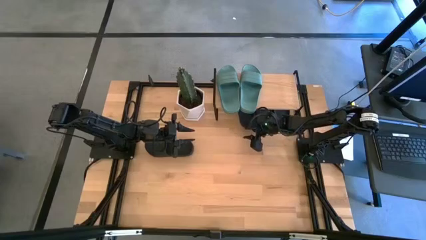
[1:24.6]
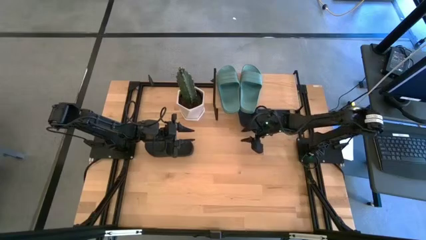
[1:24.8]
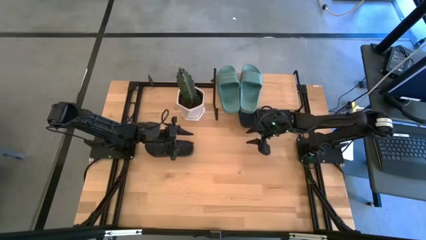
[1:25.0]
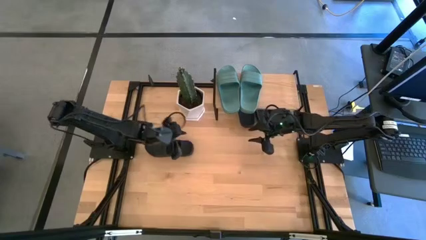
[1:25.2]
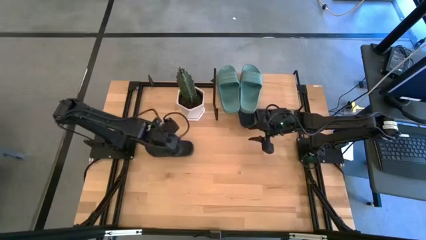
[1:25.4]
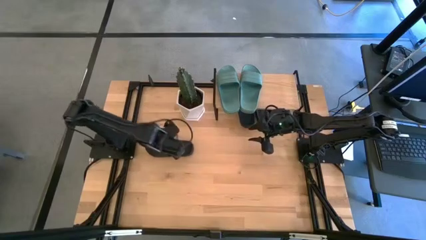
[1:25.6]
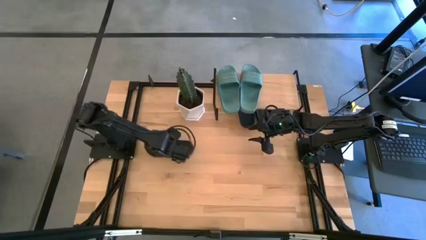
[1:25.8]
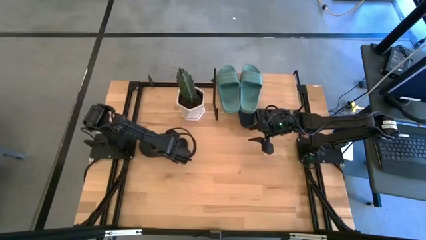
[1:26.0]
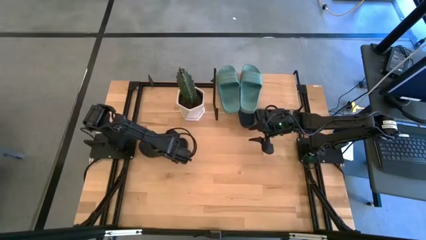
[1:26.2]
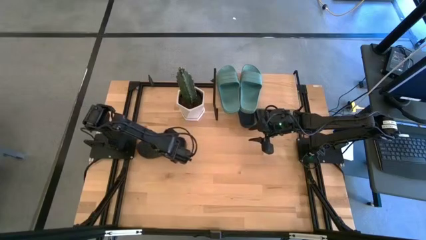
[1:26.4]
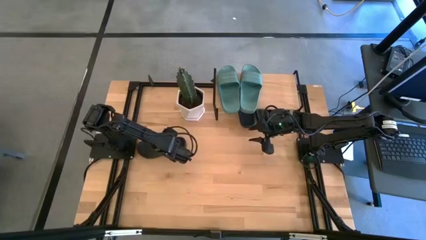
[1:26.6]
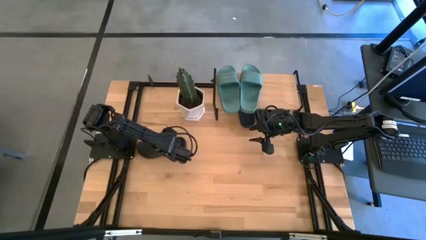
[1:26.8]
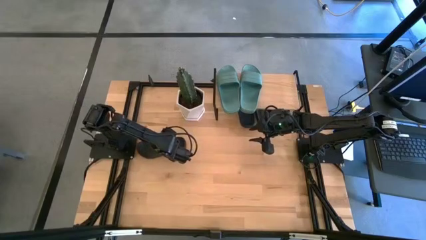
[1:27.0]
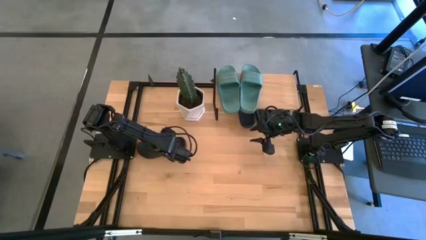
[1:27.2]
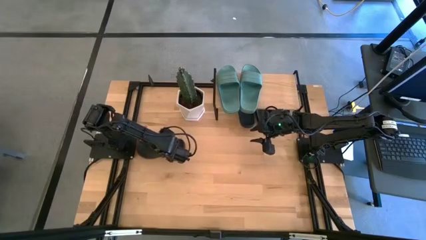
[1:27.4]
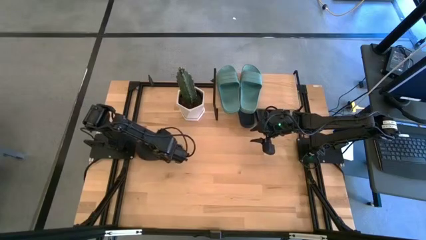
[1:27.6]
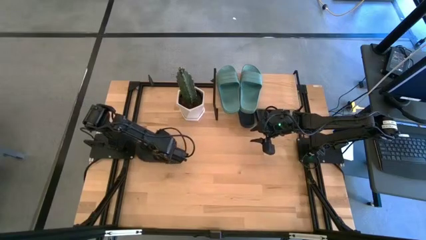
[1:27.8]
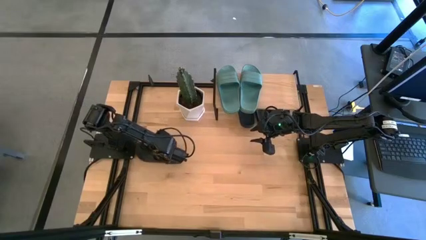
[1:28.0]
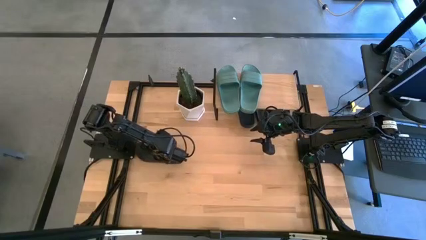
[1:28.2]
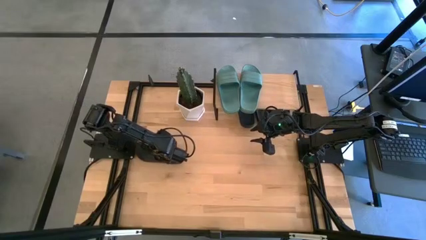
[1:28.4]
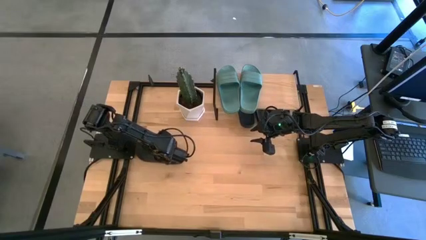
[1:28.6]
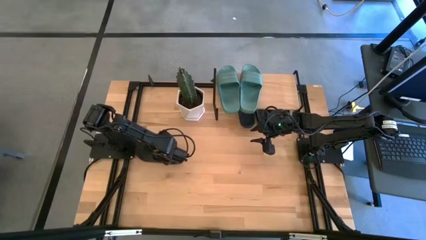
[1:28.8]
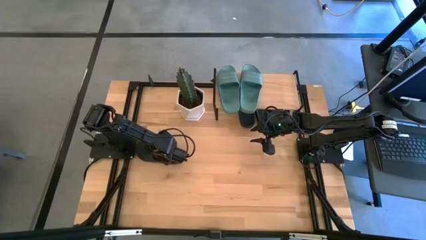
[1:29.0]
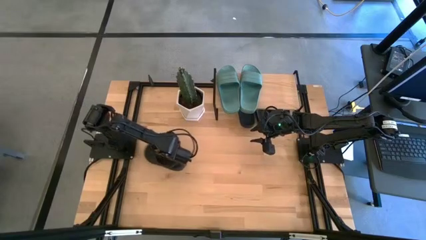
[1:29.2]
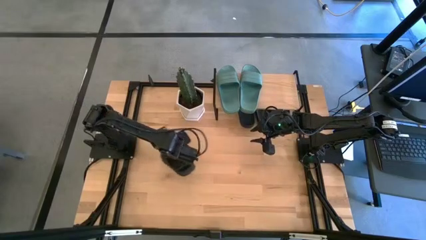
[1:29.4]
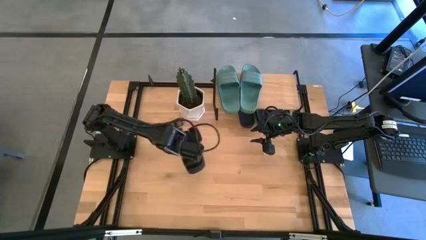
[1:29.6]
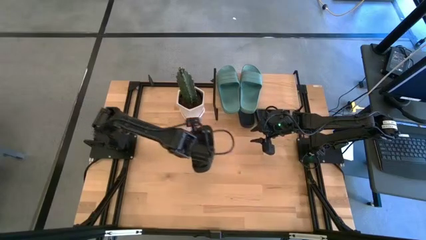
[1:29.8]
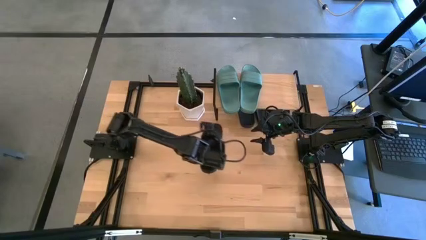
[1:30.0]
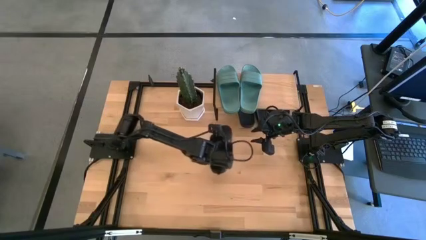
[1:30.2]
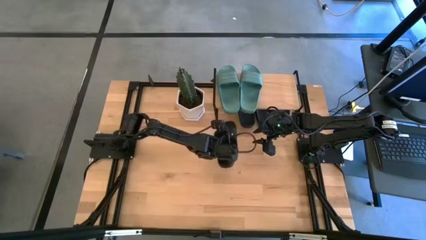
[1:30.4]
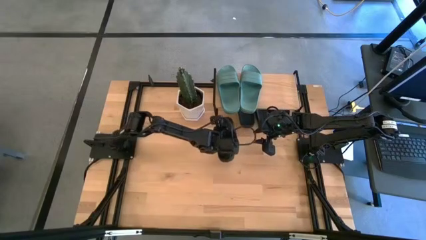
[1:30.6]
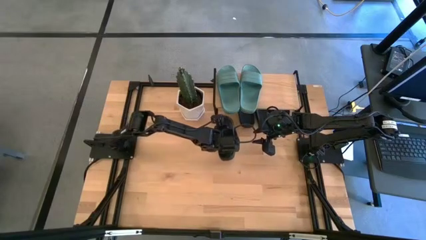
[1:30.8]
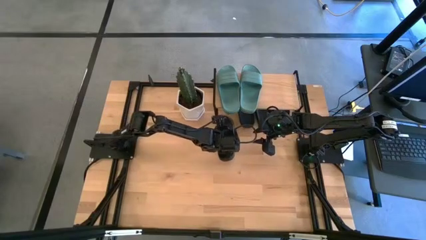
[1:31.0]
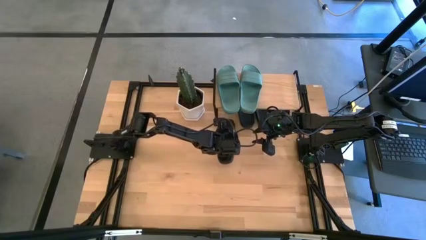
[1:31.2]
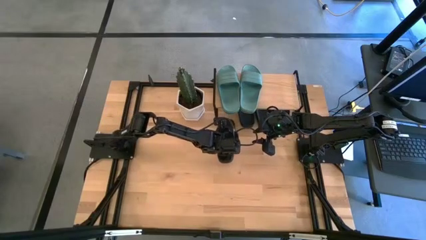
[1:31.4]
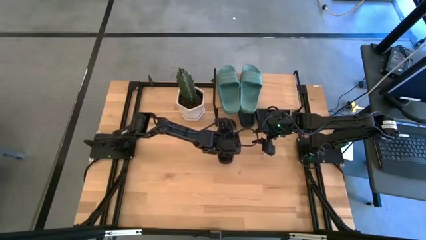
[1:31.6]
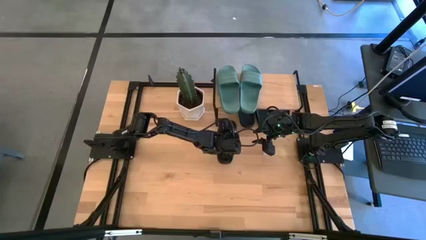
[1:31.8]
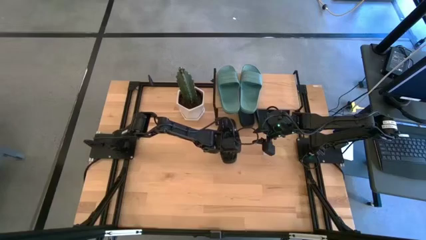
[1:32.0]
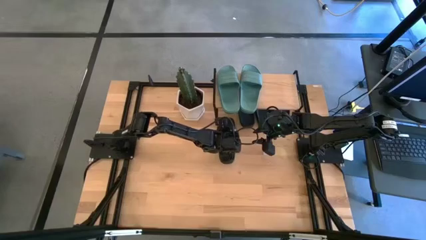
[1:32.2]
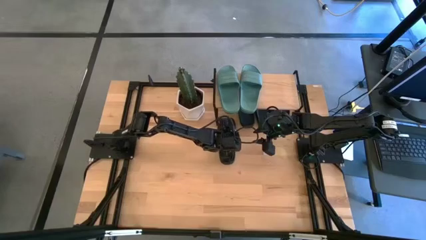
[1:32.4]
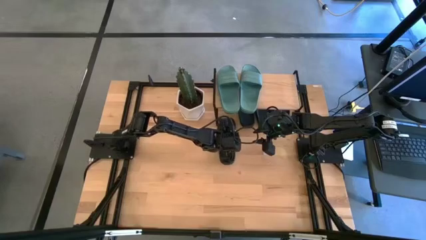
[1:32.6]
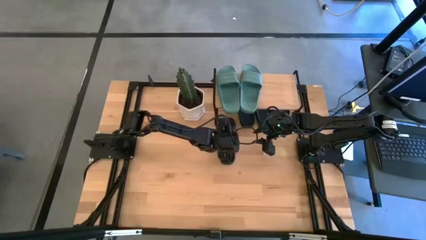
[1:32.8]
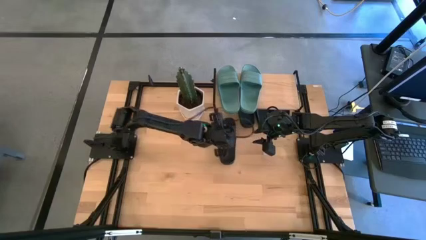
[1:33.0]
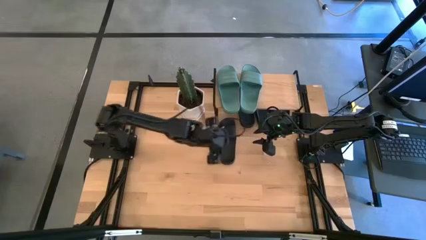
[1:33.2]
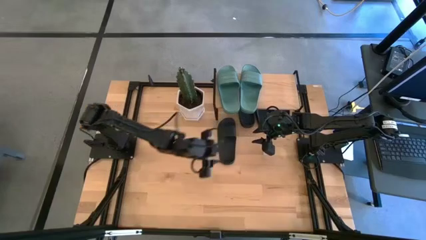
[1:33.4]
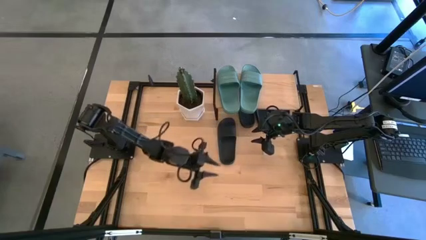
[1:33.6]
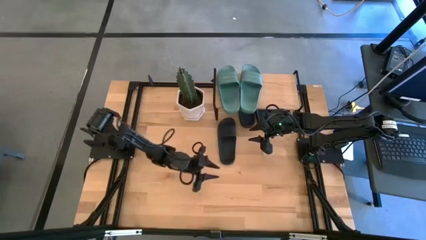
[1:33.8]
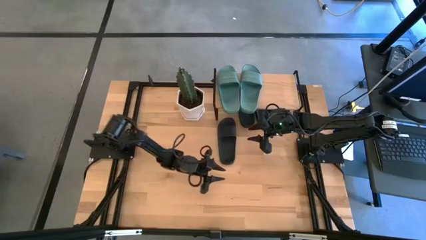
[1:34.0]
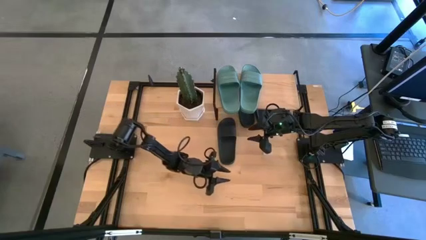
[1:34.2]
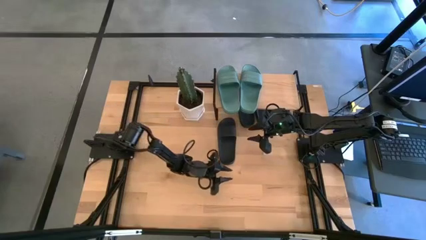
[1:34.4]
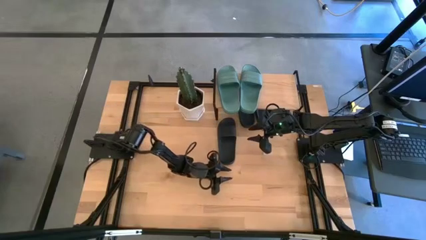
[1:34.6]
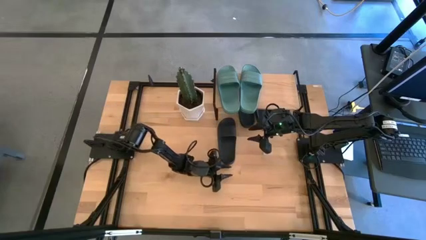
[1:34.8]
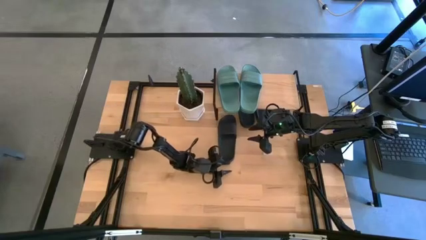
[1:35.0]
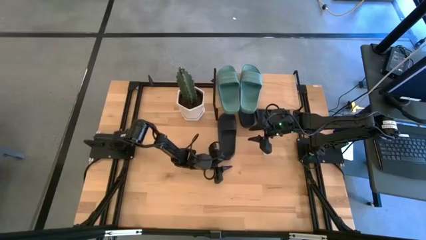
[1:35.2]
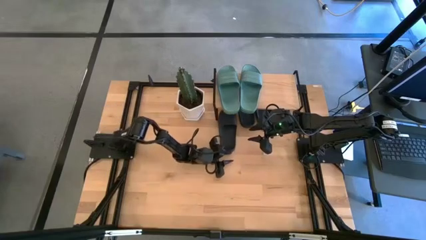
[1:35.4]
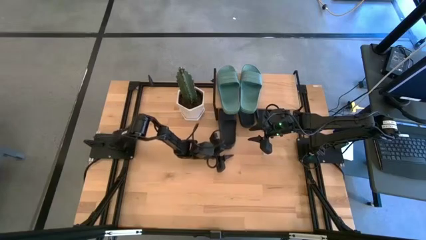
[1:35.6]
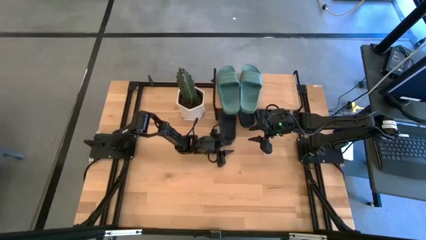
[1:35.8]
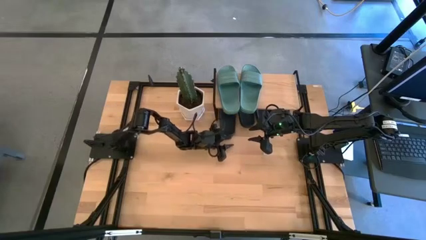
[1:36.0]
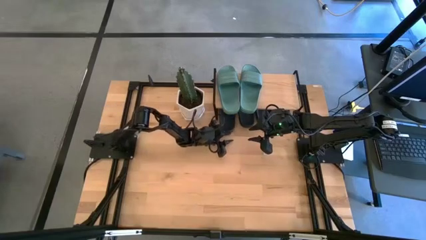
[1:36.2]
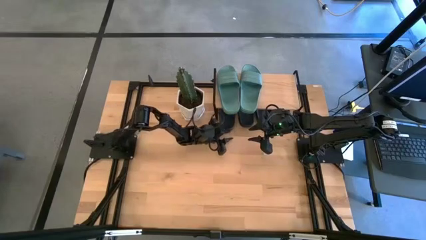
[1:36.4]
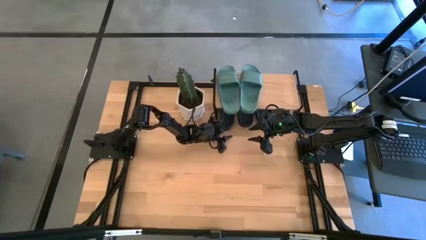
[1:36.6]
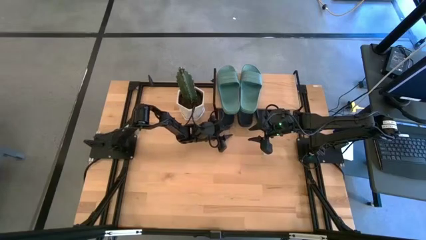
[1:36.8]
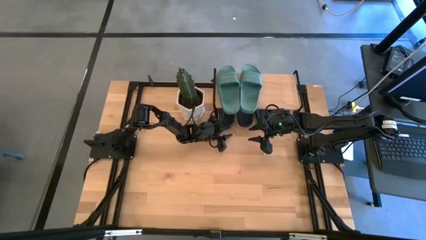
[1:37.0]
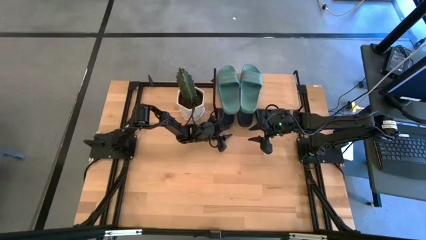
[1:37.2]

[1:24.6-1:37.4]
Task: Pick and place slides into the shelf
Put the black slipper under the shelf
